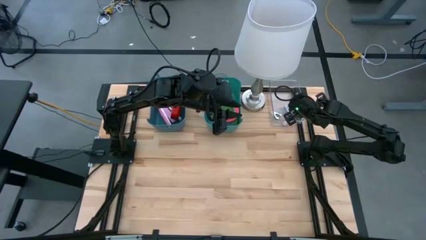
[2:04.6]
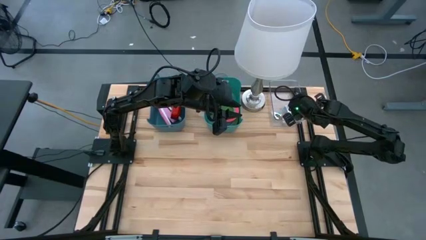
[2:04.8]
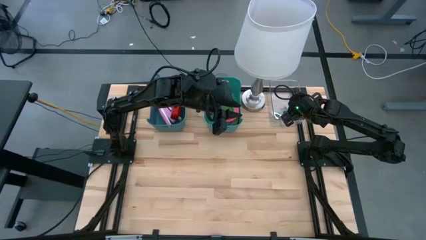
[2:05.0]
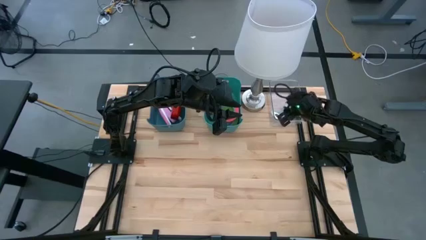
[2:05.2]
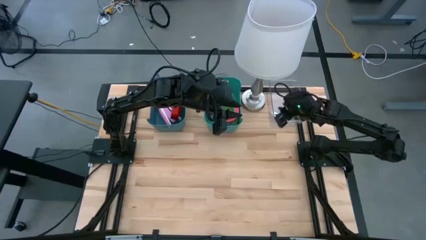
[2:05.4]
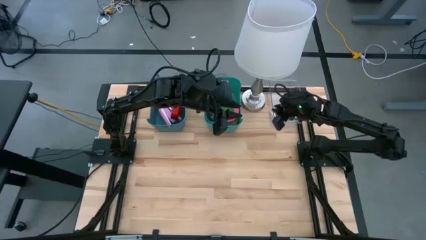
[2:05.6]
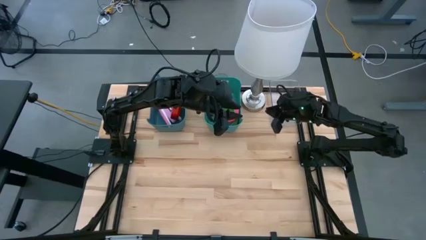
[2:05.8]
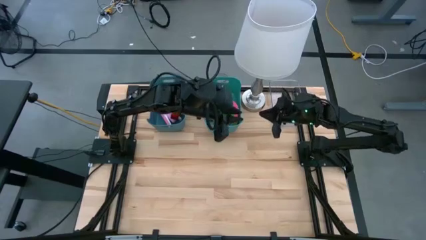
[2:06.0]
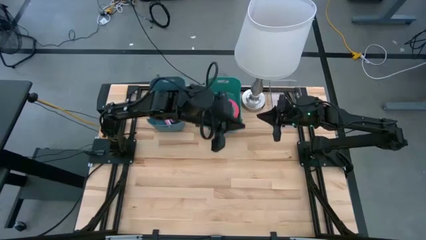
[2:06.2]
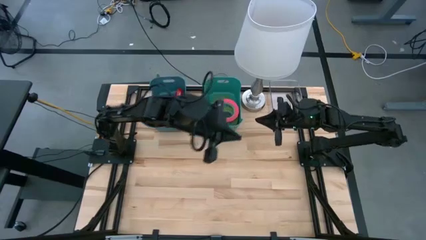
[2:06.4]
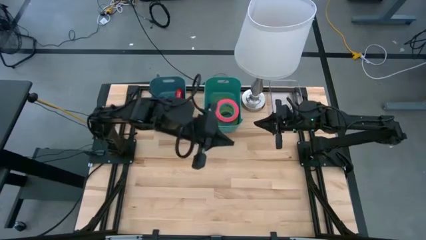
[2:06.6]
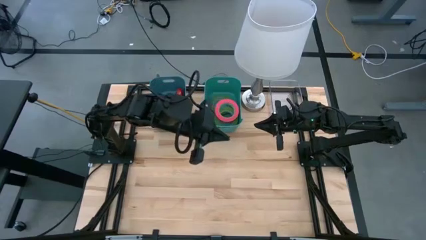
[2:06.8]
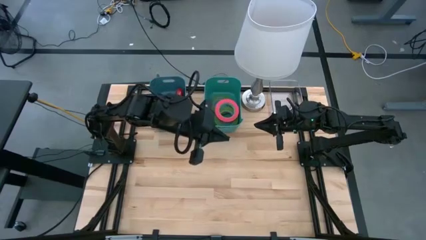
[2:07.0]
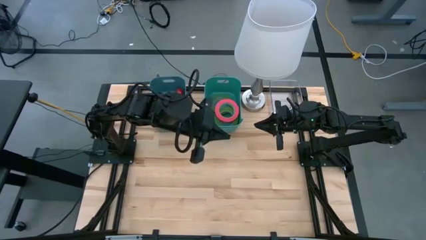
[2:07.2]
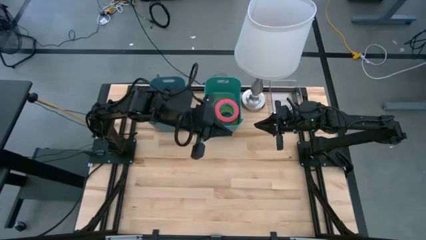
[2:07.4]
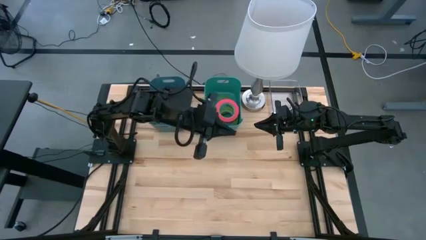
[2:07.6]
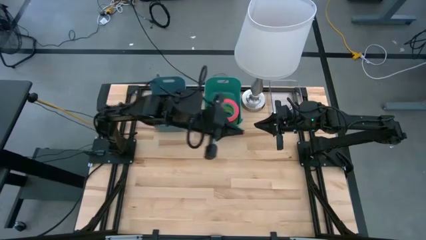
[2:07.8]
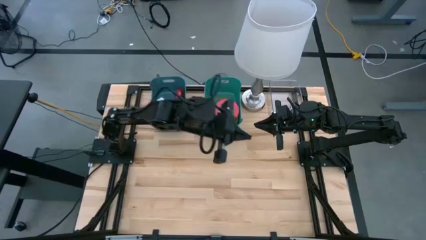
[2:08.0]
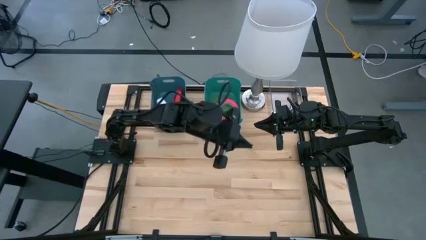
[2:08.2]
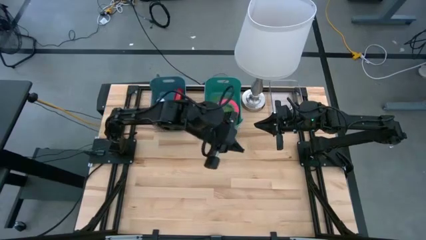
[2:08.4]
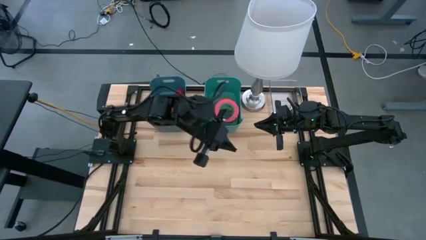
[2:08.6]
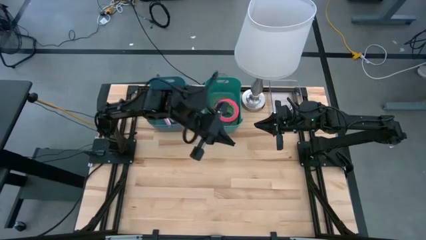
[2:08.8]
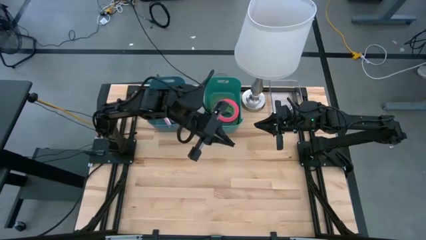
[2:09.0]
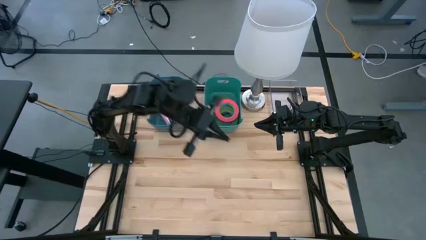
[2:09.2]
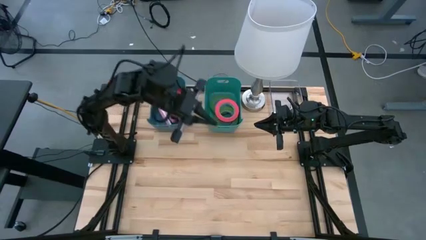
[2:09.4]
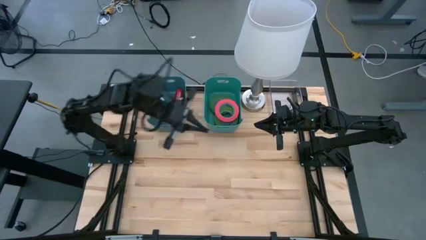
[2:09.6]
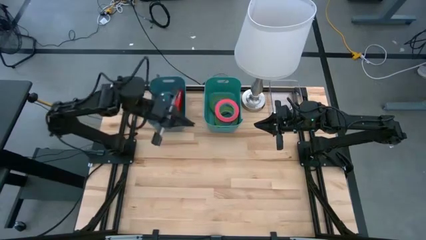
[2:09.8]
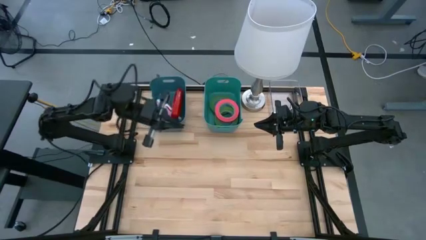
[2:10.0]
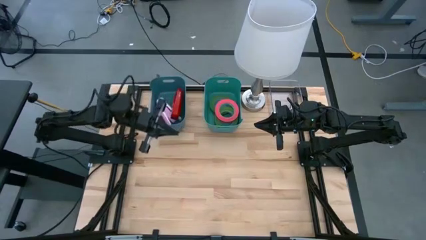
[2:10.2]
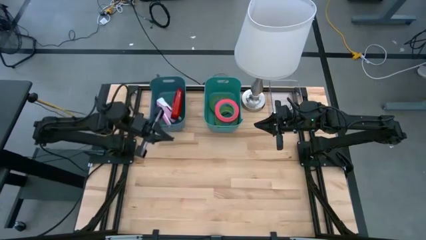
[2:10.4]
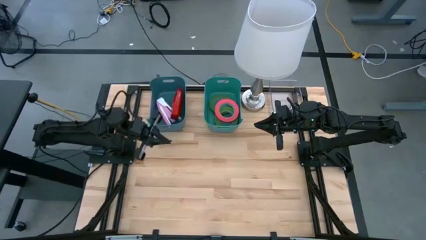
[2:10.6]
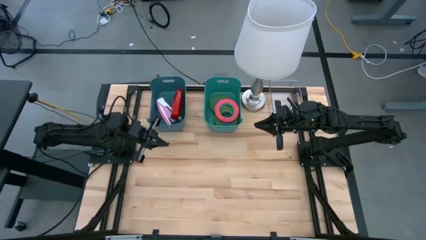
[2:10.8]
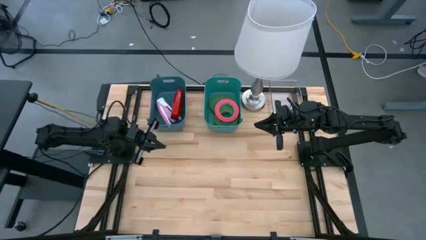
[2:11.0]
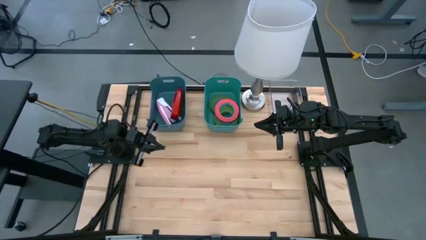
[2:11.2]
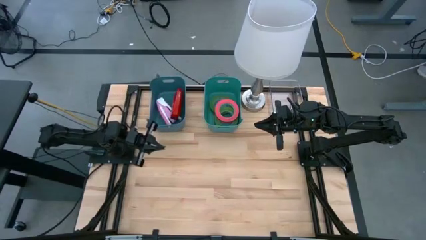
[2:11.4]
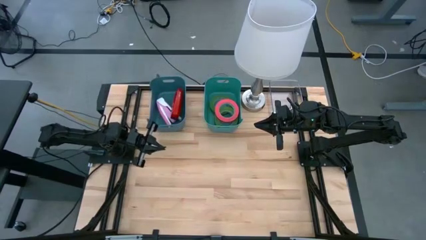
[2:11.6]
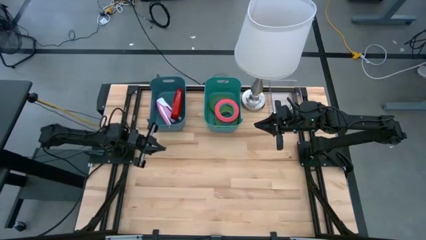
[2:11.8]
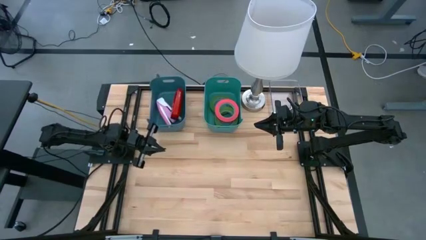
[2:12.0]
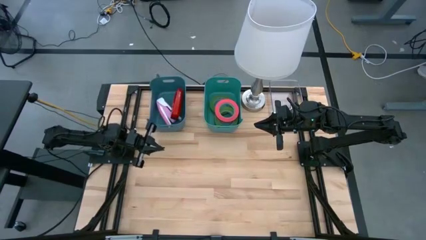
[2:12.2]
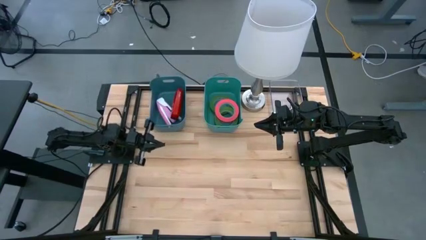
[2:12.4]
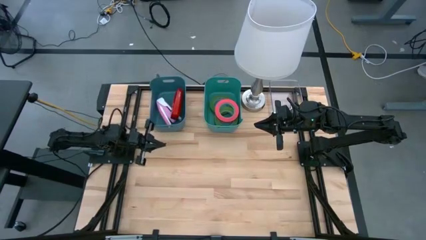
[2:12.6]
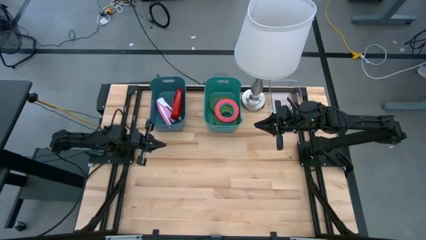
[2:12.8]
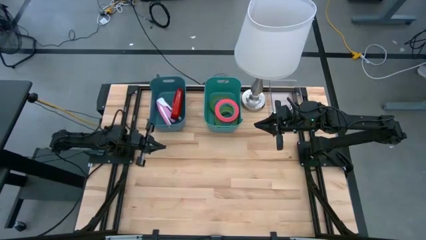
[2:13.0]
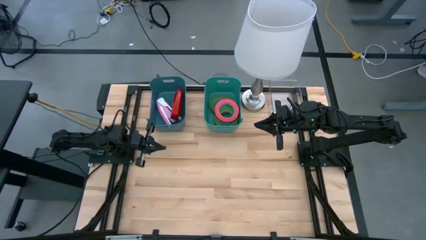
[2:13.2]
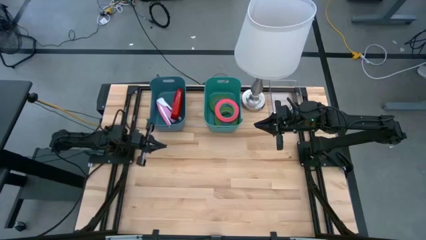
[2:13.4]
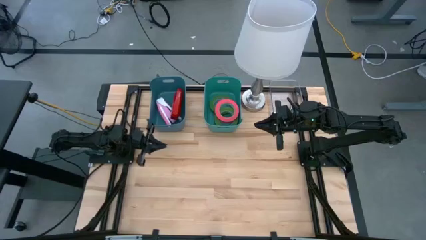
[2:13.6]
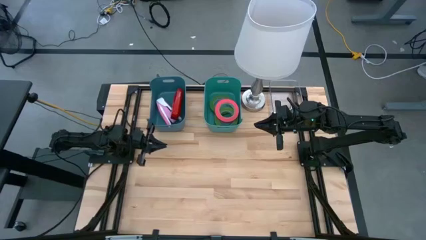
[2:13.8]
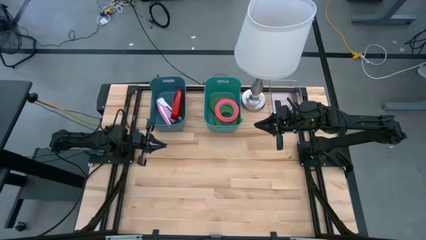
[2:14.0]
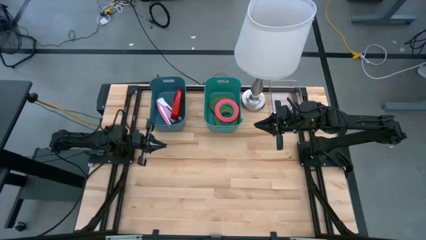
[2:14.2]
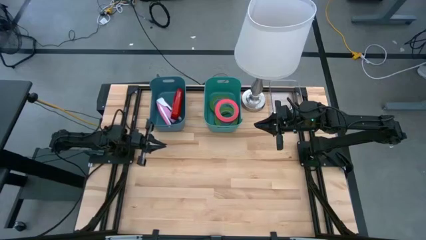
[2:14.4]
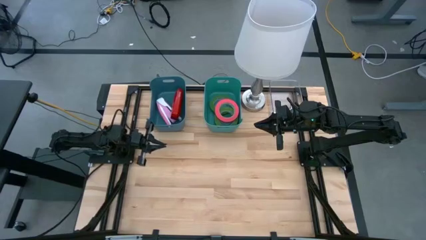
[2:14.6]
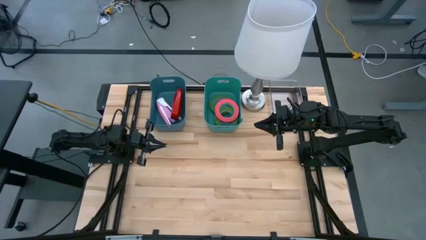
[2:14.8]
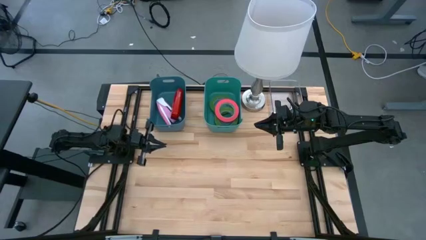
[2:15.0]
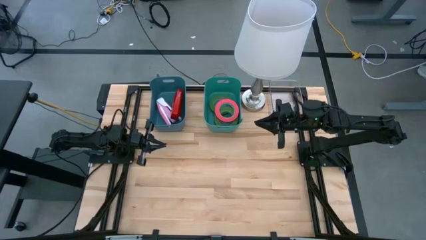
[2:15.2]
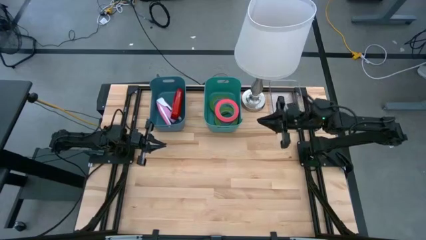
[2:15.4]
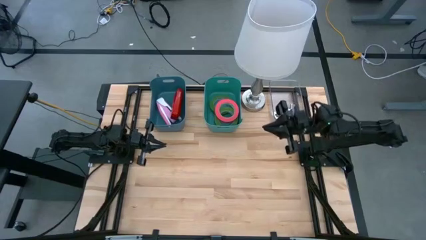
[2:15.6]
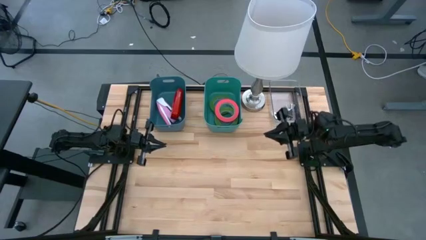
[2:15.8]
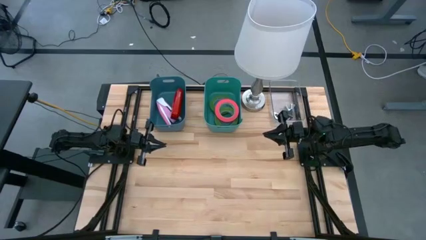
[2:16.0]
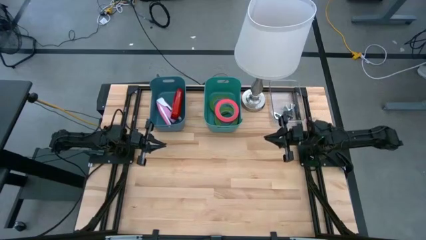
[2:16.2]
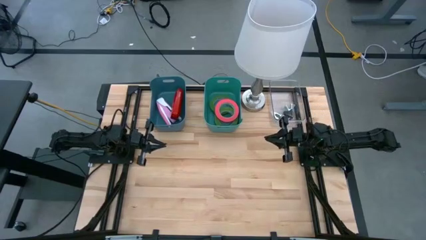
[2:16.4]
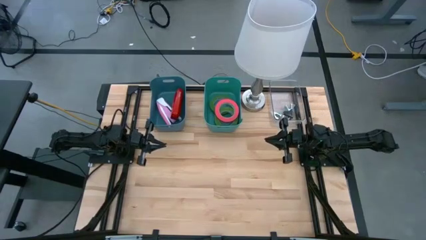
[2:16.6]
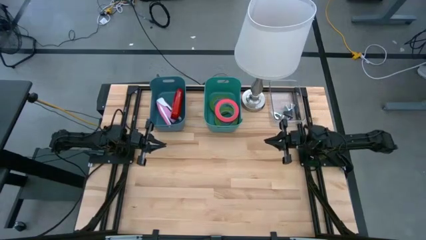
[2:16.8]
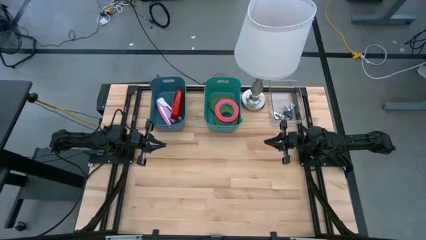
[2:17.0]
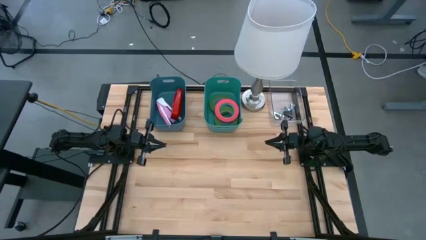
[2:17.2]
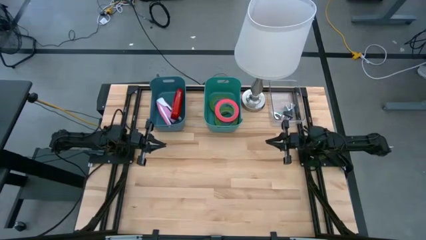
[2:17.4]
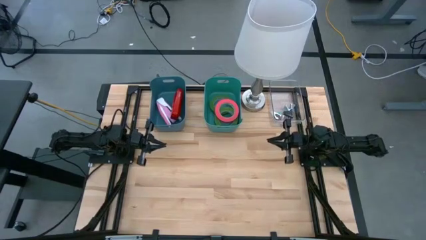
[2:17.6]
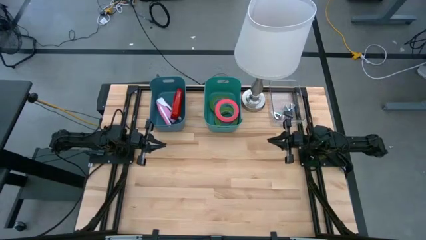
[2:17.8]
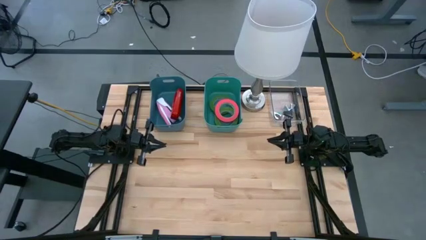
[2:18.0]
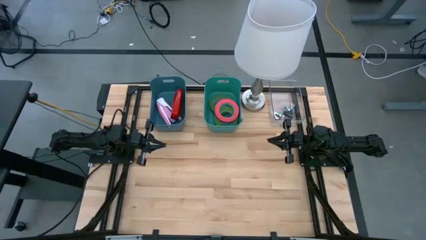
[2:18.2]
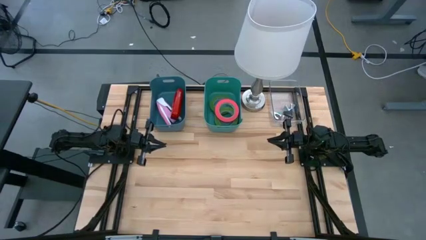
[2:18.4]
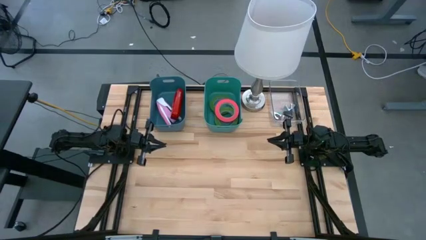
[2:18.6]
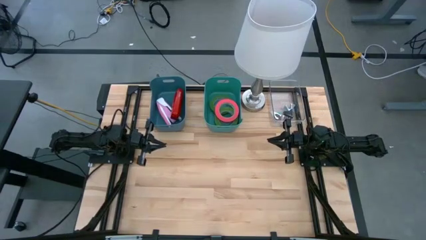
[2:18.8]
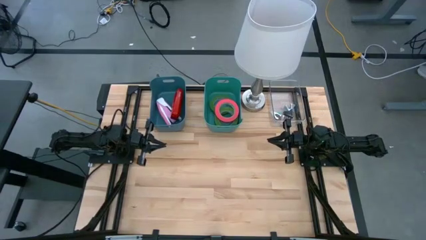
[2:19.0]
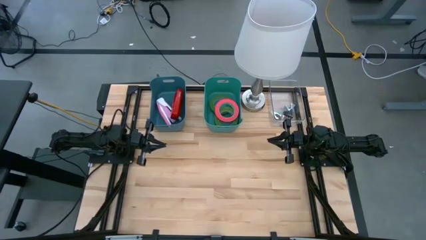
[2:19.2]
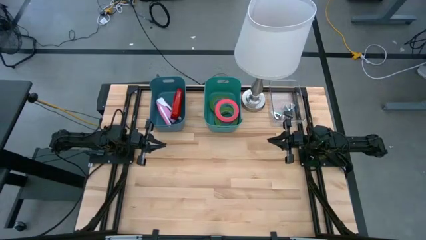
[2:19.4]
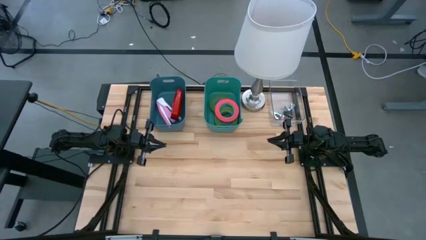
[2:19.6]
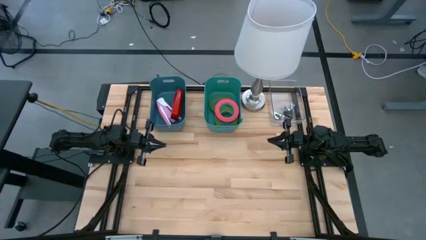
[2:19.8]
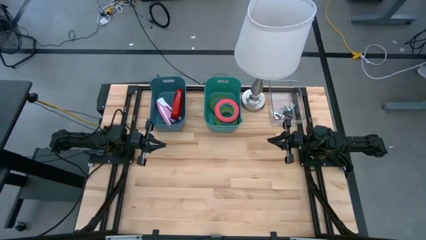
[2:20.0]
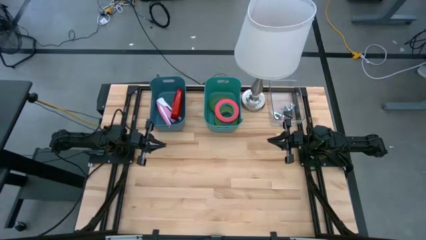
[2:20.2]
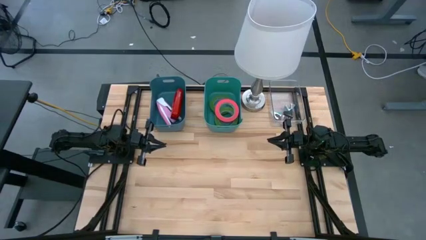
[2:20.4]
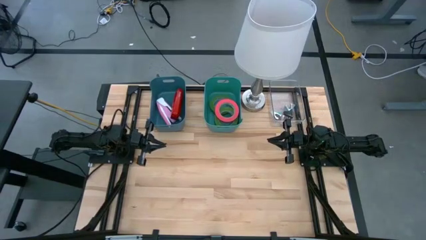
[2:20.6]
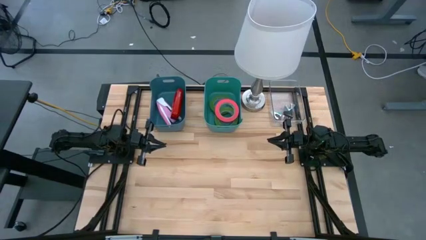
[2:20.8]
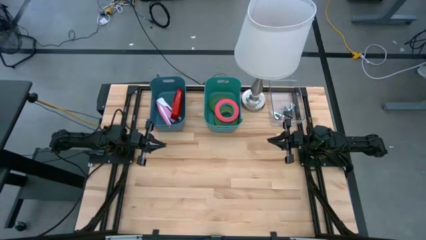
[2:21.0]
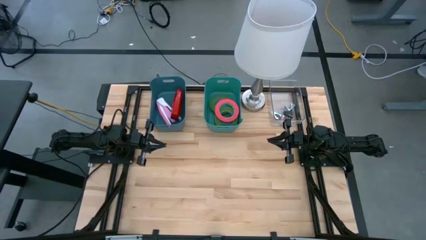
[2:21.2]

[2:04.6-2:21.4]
Task: Pick and place Stapler, Stapler remover, tape
Return to Home Position
